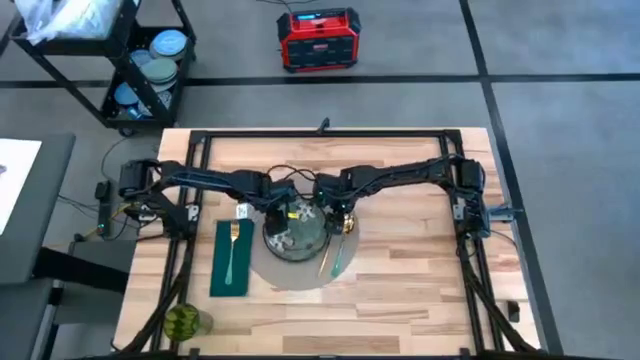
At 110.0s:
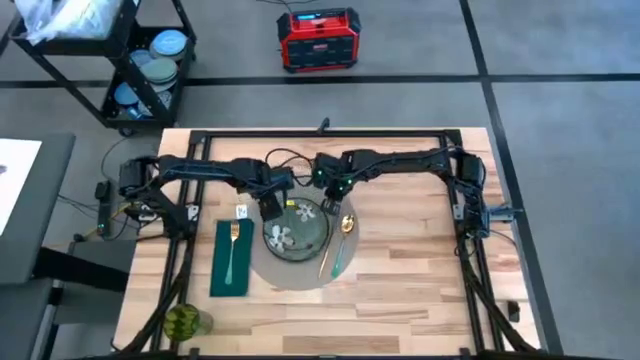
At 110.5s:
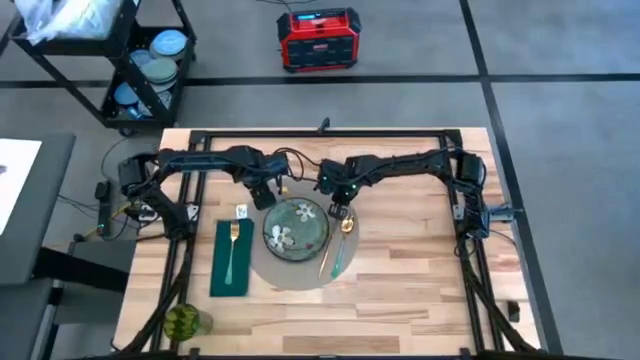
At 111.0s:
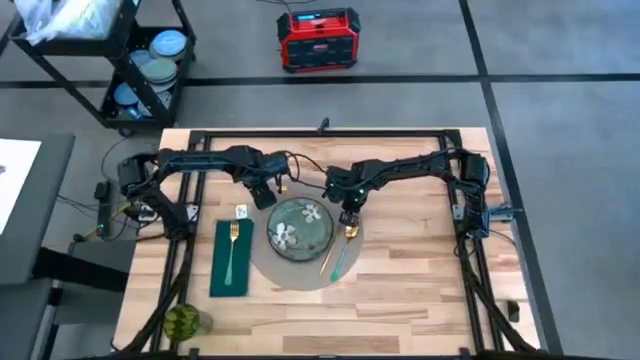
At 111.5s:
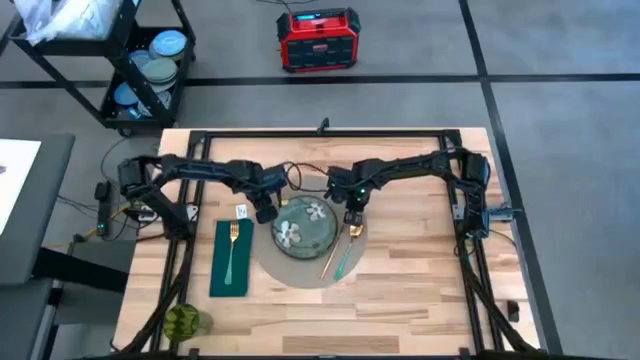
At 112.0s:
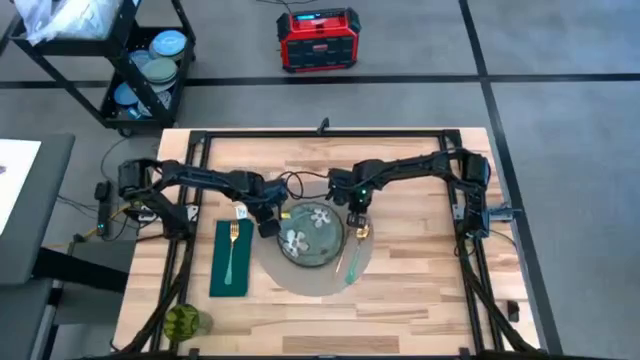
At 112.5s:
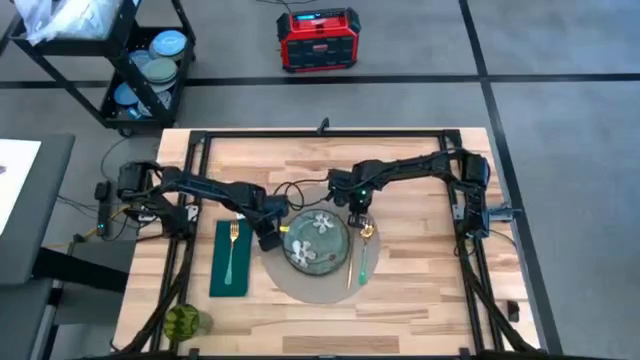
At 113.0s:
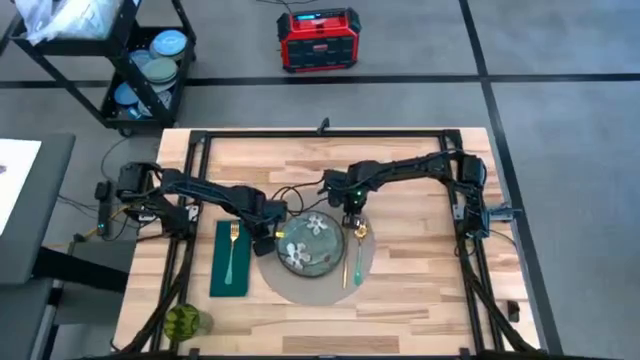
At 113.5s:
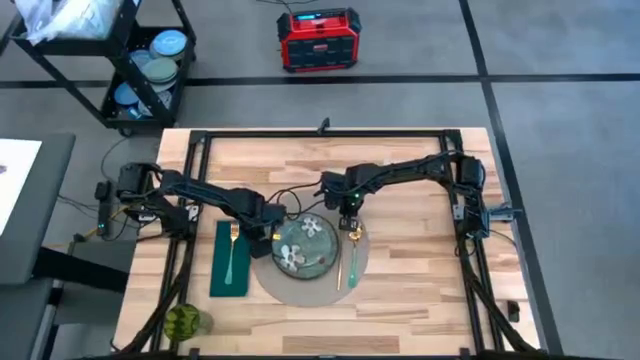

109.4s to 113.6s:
Task: Set table place
Adjust the gray table placemat

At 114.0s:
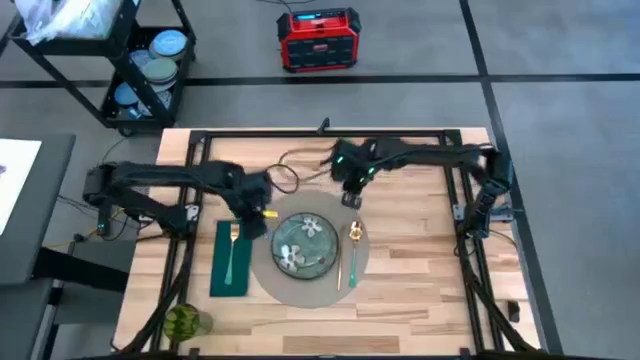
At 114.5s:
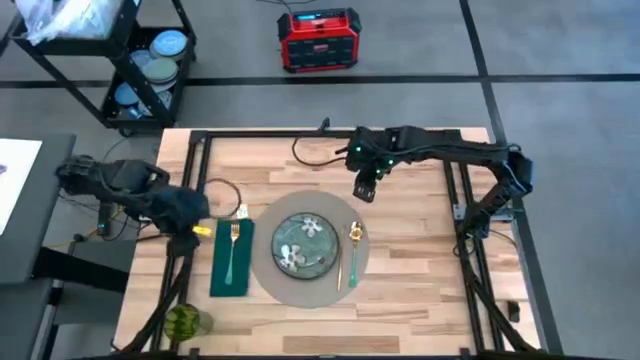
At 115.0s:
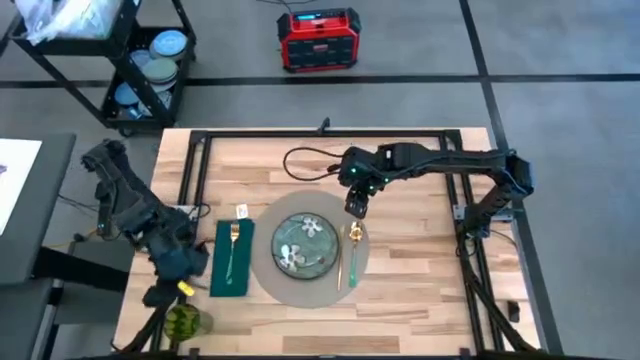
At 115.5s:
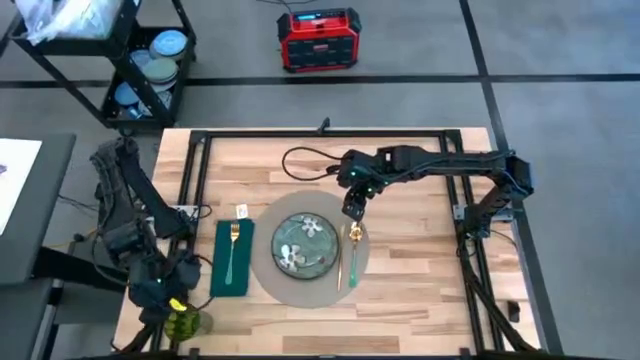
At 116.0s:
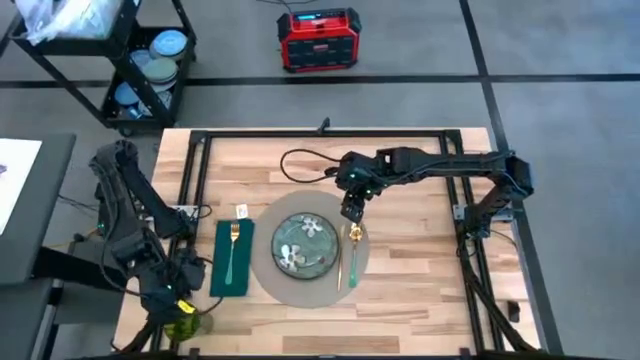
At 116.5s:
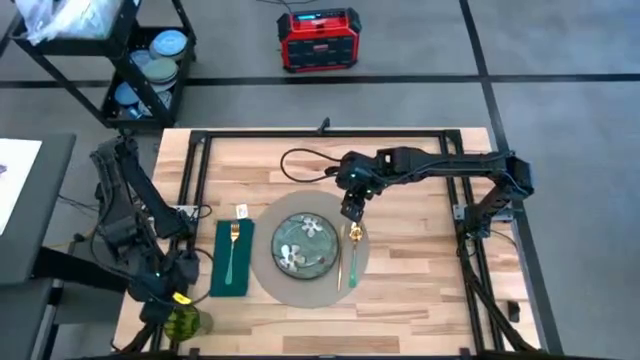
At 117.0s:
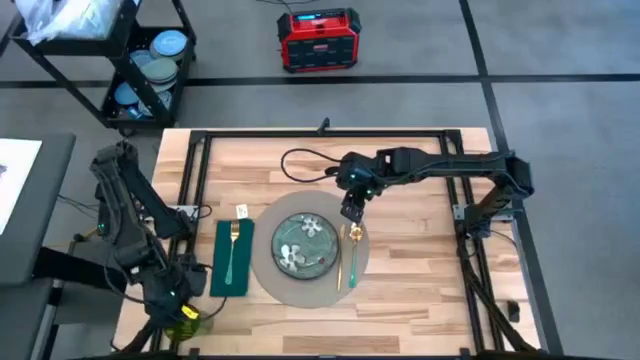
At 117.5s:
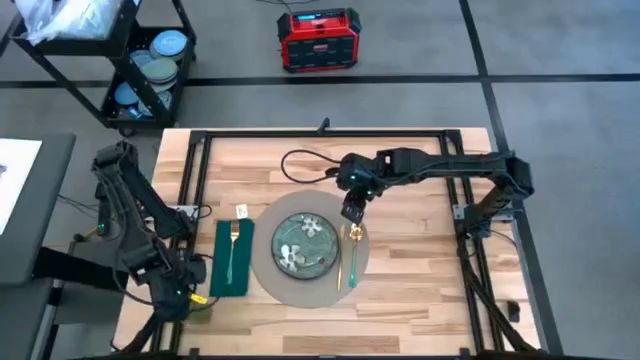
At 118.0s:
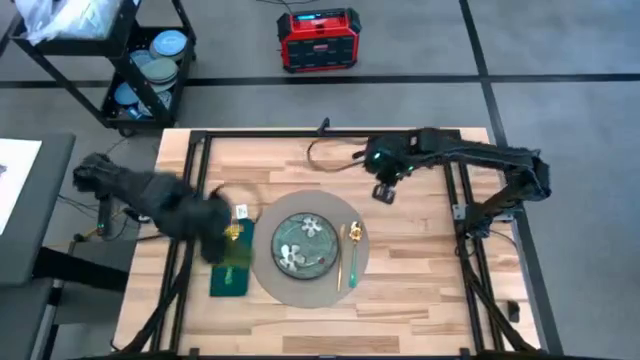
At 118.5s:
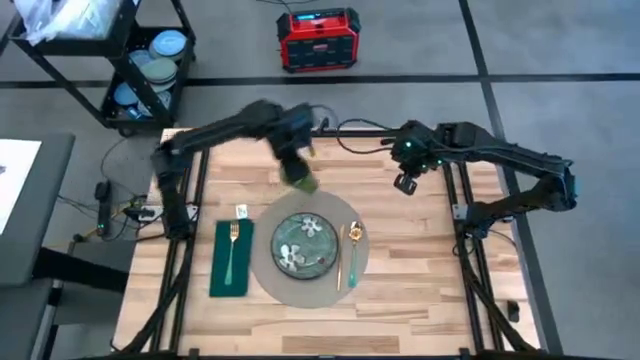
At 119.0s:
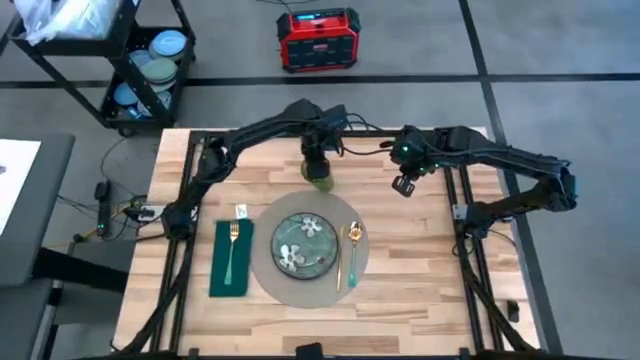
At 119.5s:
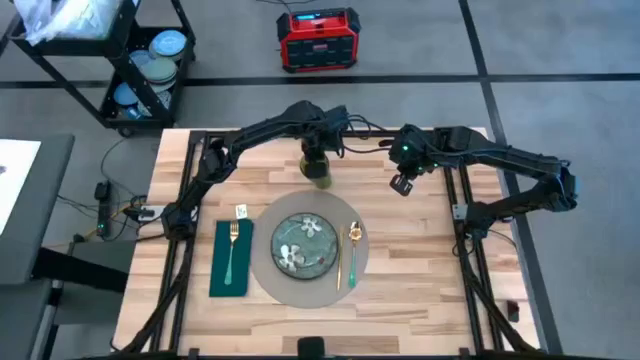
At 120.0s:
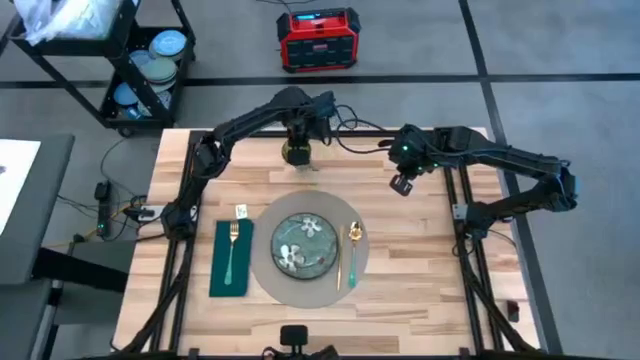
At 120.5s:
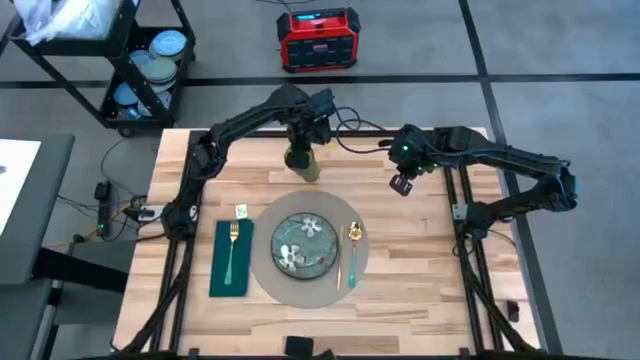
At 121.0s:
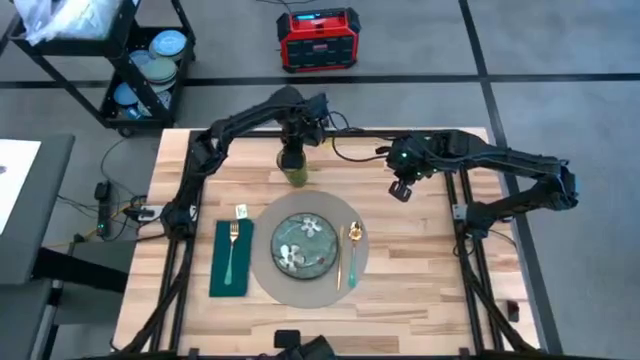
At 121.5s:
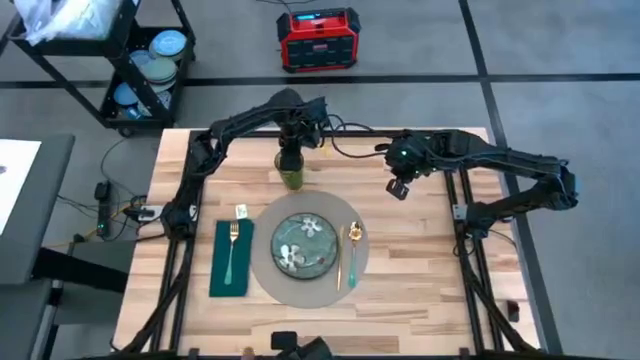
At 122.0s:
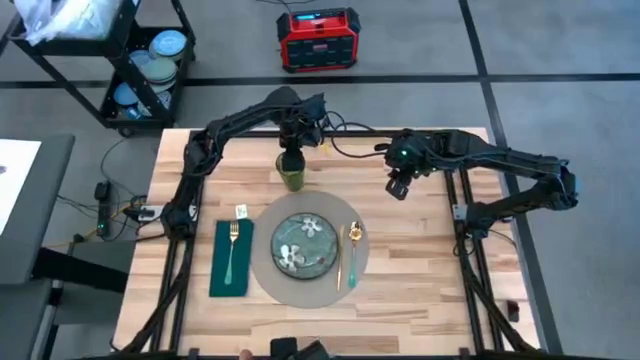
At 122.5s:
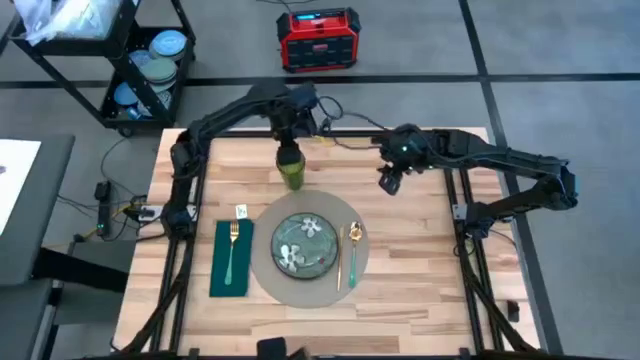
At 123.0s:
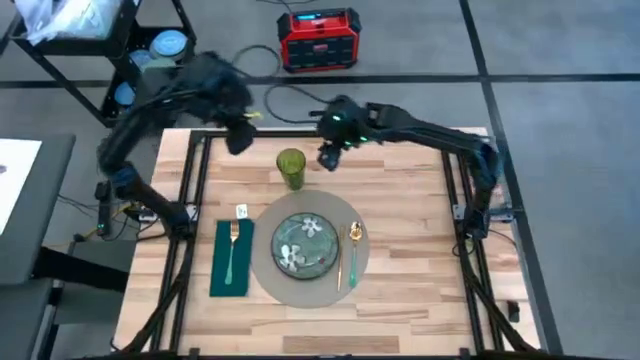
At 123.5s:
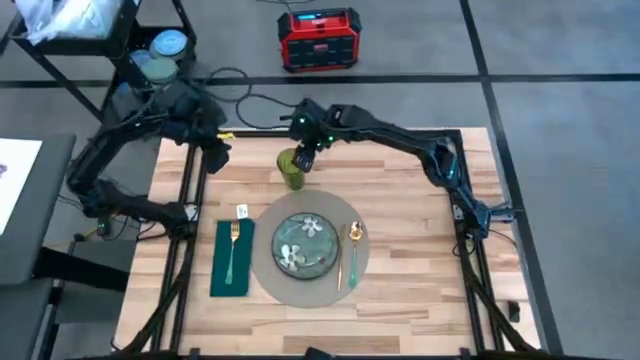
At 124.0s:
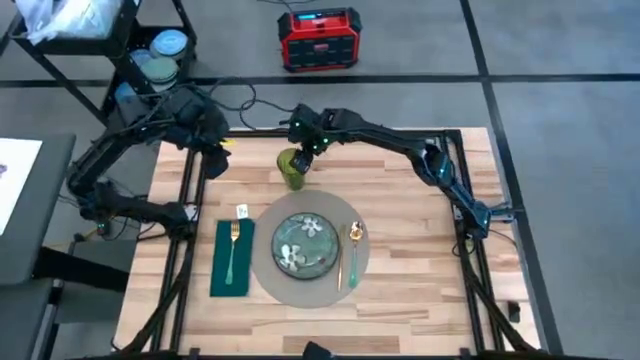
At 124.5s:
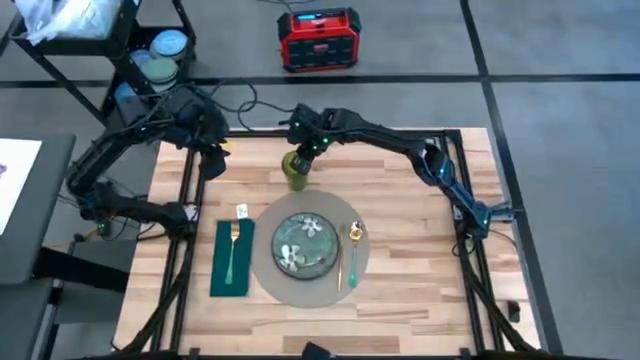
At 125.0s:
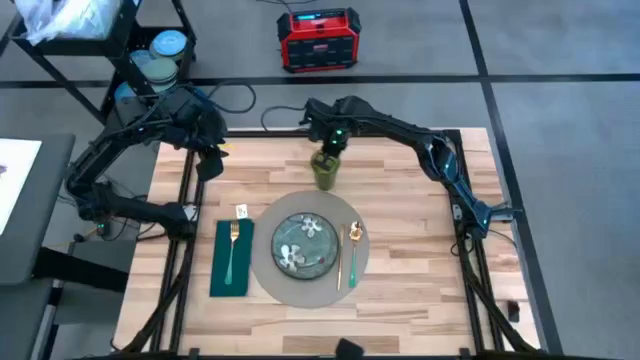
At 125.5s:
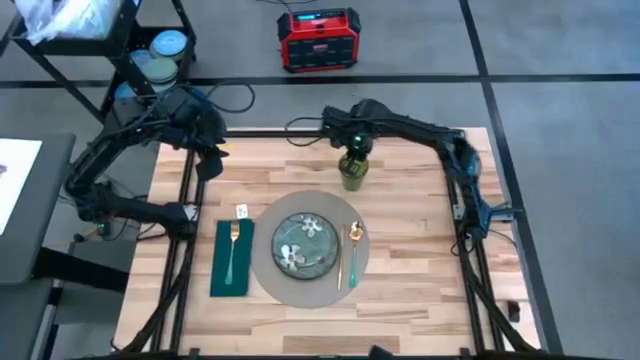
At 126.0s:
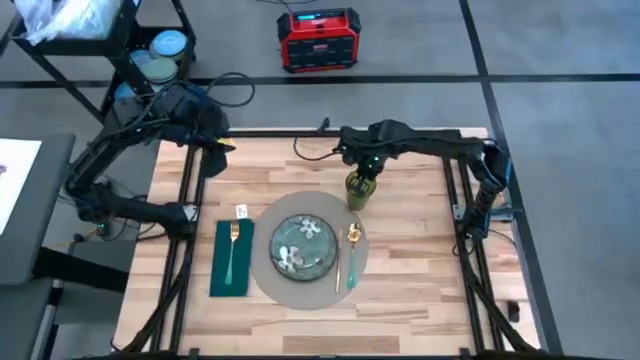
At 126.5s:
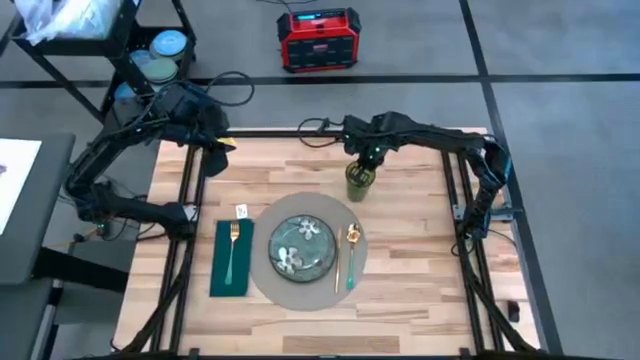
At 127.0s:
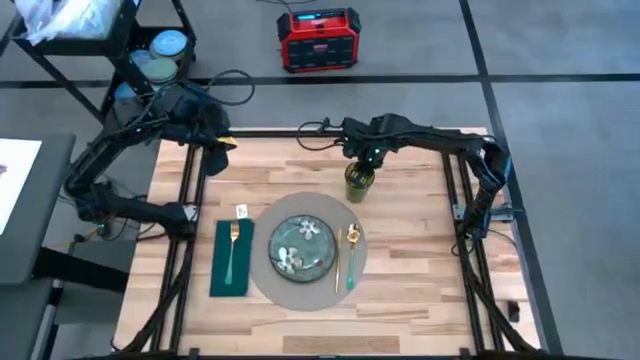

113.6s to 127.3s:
Put the green cup to the top right of the gray table placemat

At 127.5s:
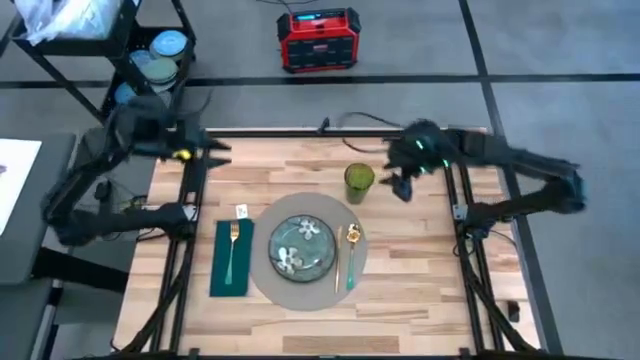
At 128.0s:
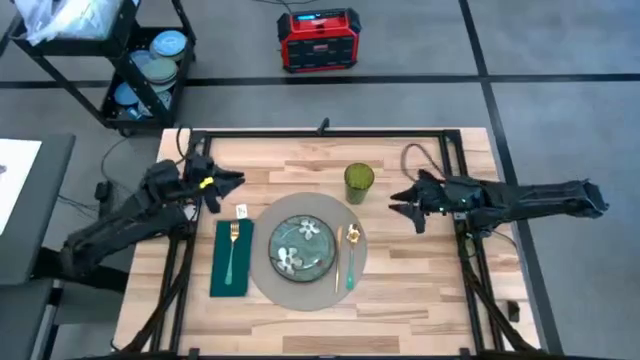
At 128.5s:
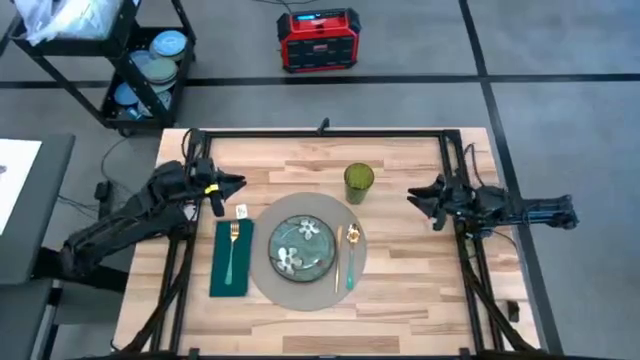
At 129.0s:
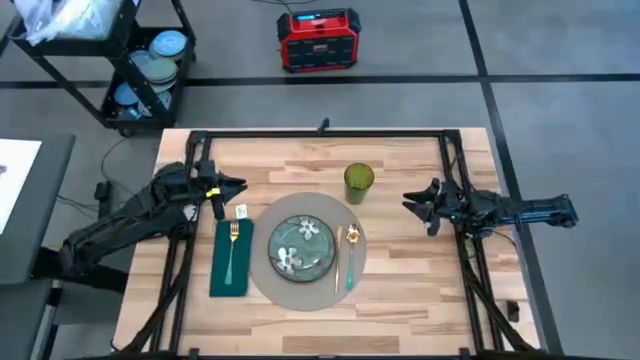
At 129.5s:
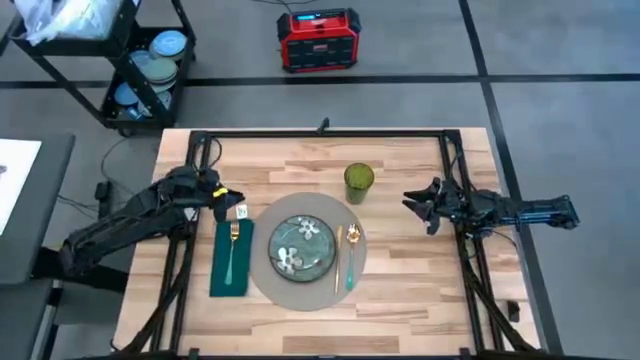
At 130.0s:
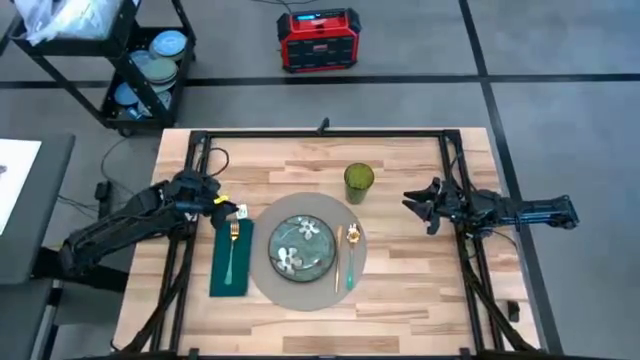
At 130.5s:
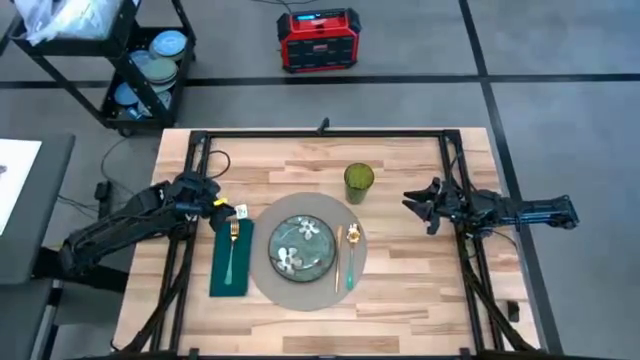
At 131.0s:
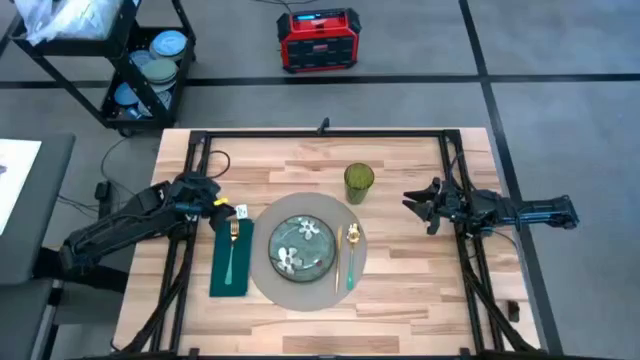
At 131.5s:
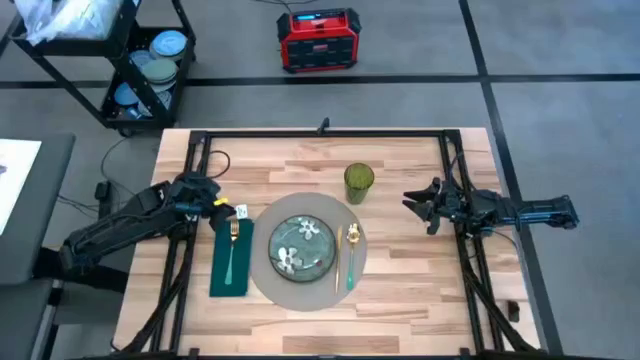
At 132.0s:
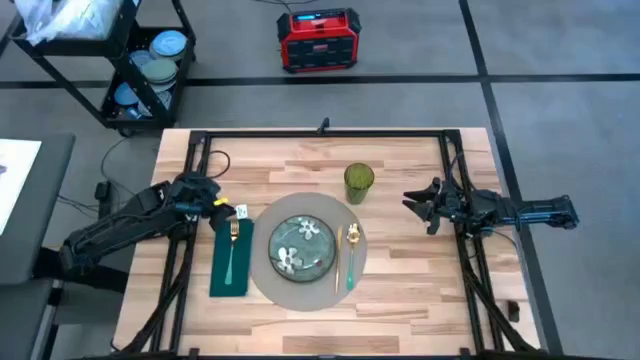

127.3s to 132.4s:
Return to Home Position
